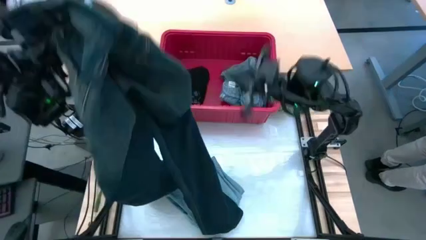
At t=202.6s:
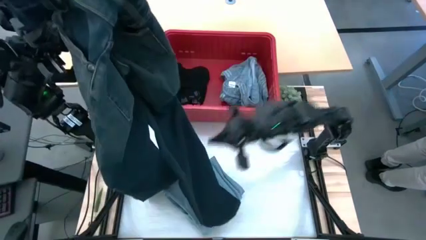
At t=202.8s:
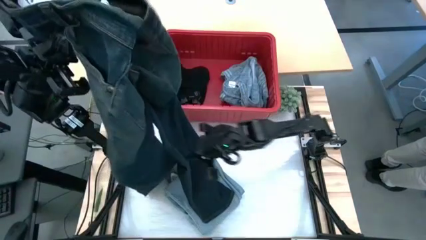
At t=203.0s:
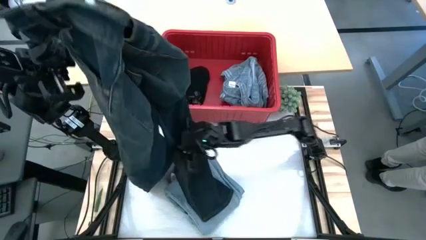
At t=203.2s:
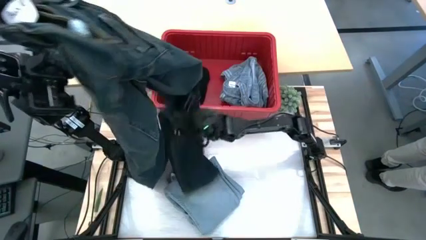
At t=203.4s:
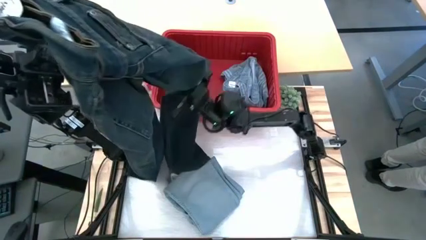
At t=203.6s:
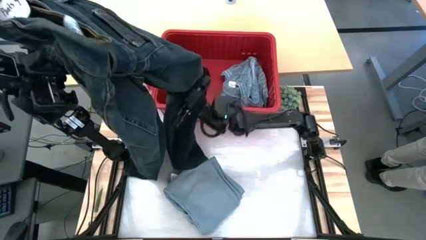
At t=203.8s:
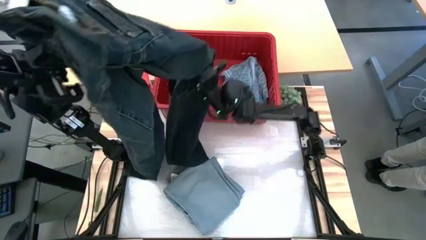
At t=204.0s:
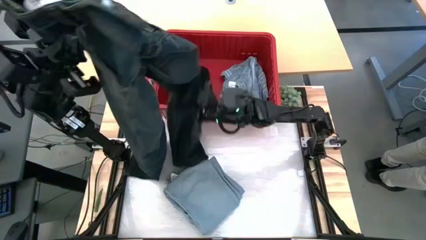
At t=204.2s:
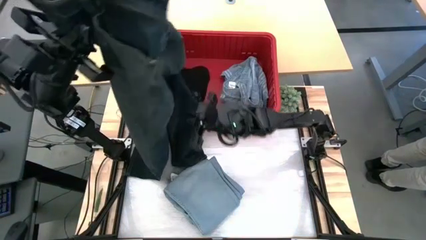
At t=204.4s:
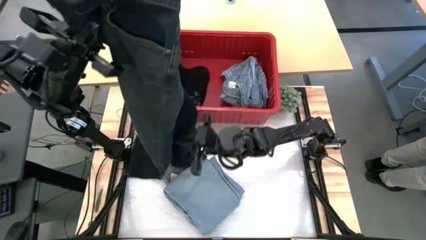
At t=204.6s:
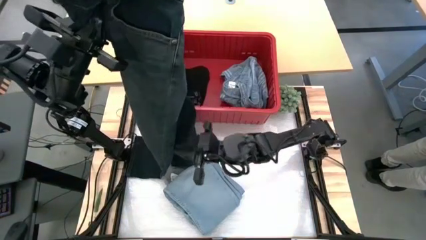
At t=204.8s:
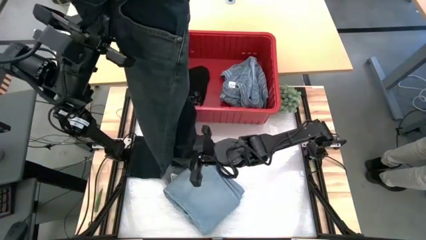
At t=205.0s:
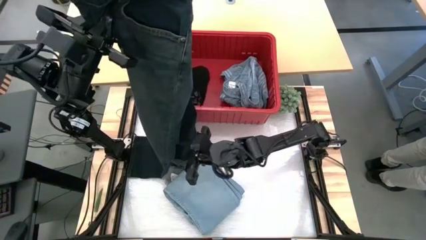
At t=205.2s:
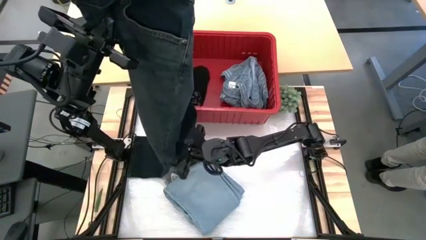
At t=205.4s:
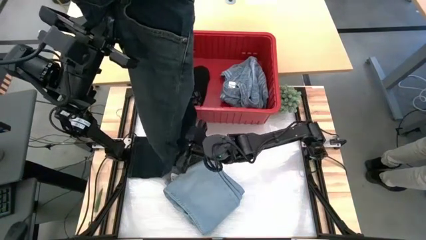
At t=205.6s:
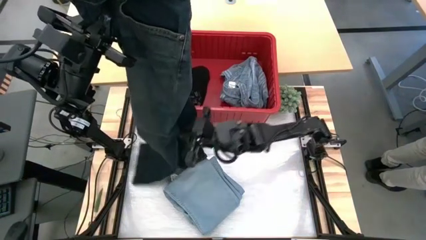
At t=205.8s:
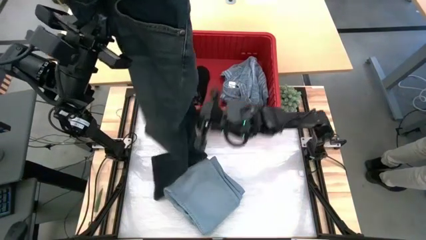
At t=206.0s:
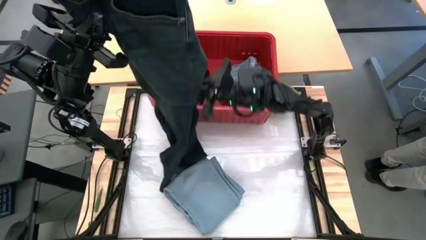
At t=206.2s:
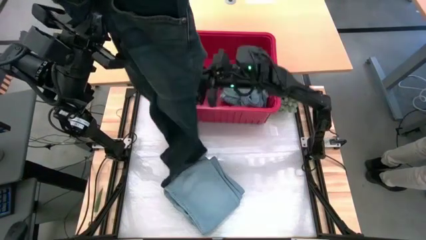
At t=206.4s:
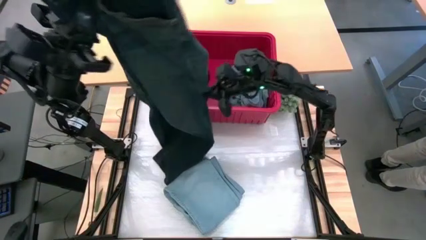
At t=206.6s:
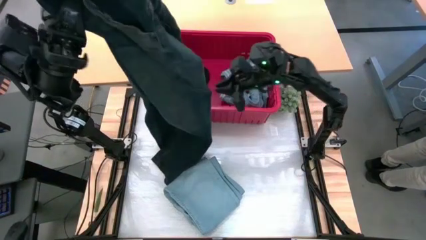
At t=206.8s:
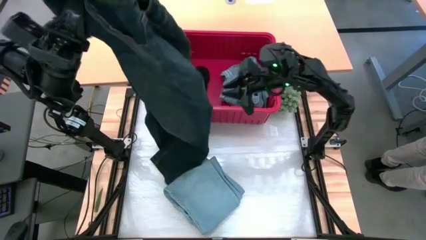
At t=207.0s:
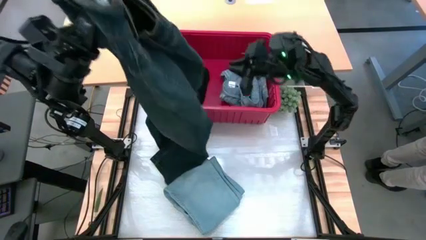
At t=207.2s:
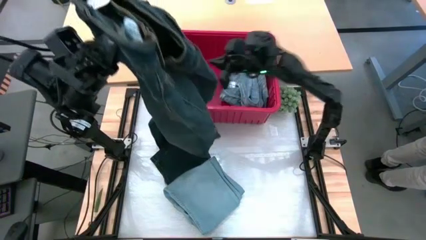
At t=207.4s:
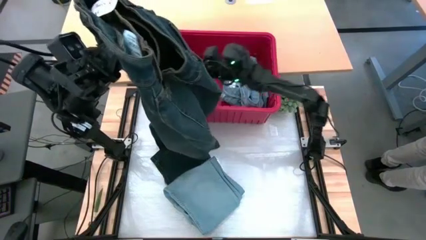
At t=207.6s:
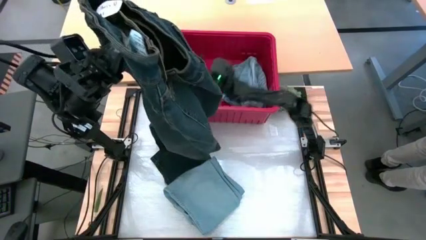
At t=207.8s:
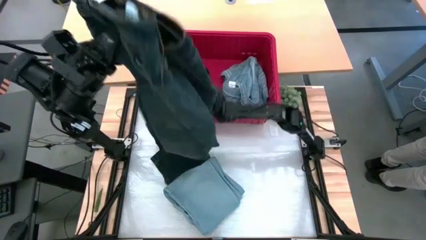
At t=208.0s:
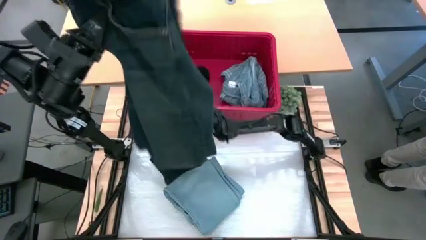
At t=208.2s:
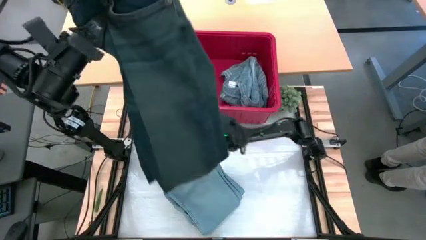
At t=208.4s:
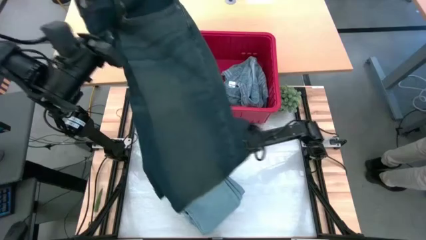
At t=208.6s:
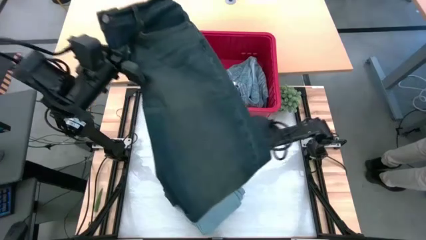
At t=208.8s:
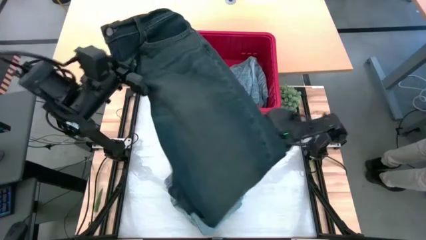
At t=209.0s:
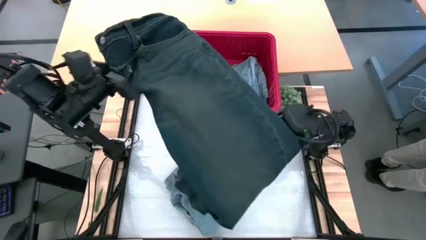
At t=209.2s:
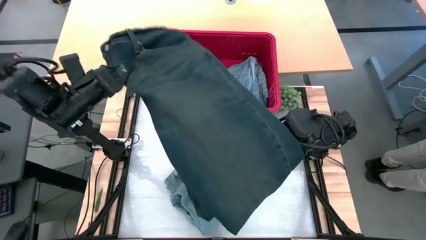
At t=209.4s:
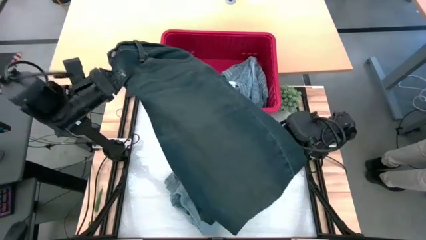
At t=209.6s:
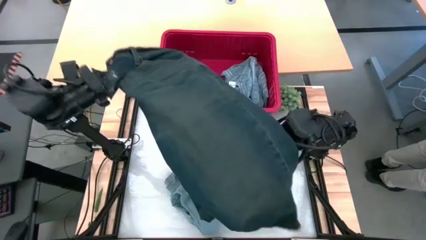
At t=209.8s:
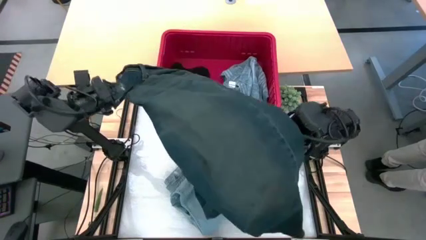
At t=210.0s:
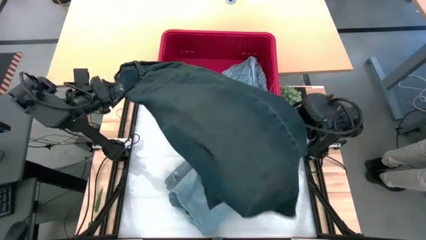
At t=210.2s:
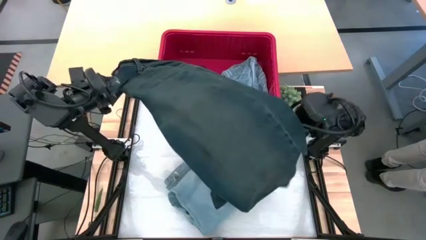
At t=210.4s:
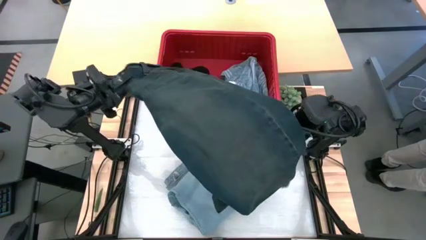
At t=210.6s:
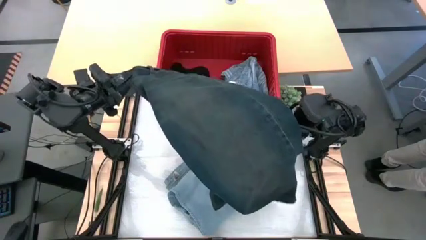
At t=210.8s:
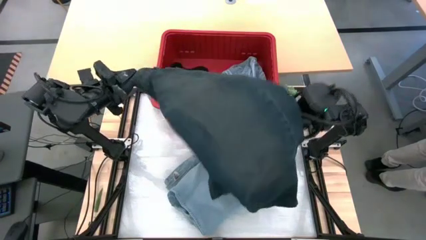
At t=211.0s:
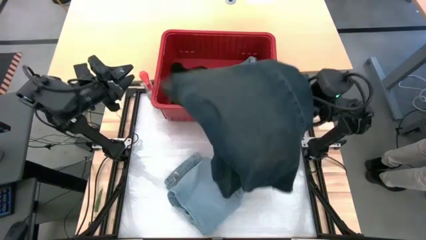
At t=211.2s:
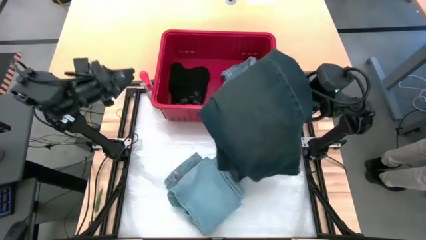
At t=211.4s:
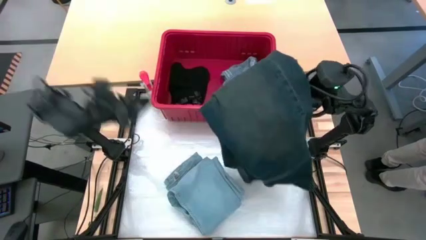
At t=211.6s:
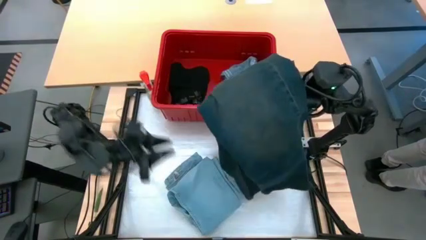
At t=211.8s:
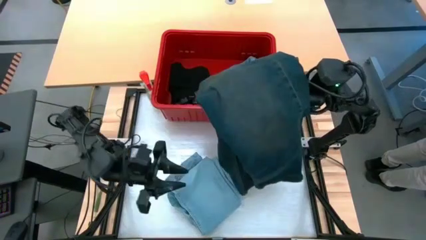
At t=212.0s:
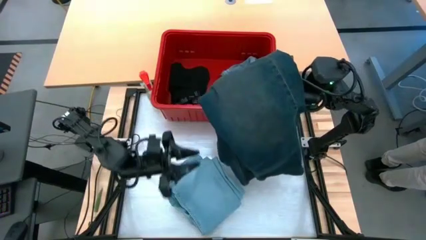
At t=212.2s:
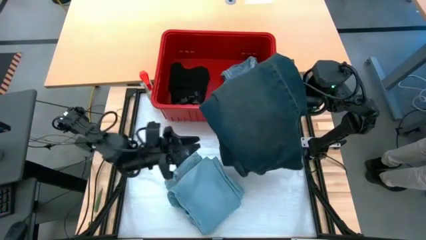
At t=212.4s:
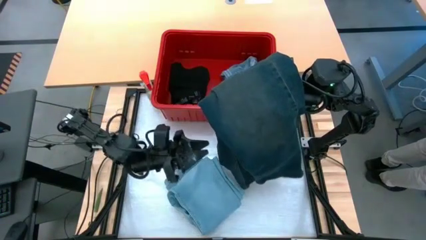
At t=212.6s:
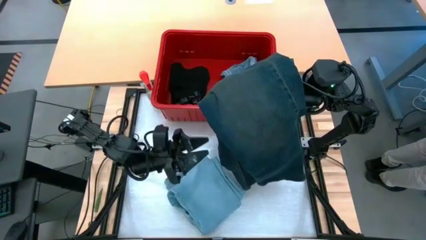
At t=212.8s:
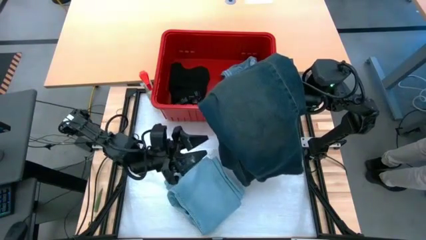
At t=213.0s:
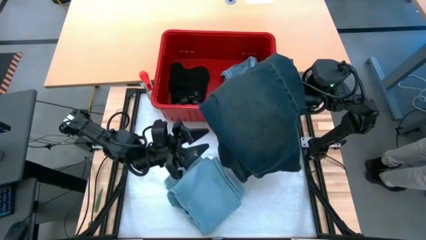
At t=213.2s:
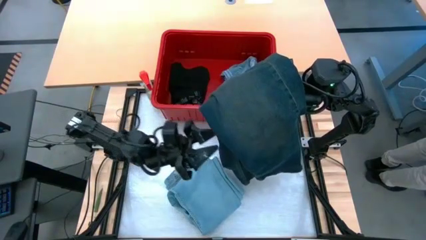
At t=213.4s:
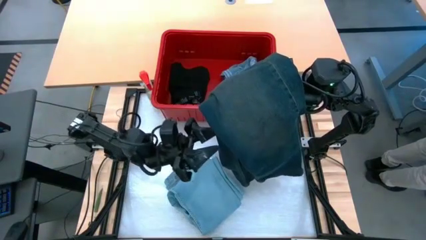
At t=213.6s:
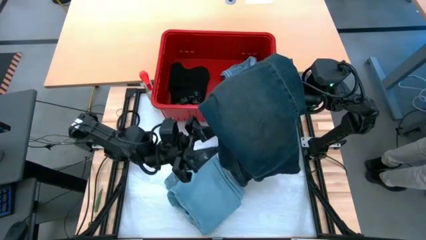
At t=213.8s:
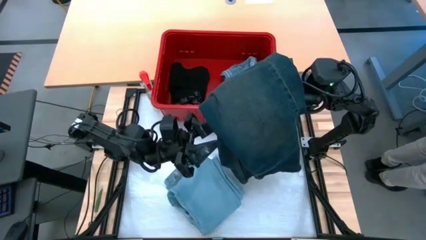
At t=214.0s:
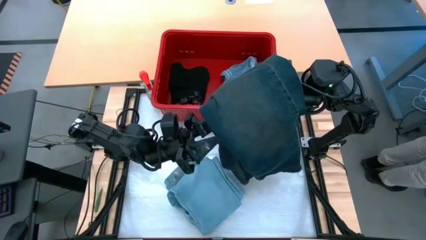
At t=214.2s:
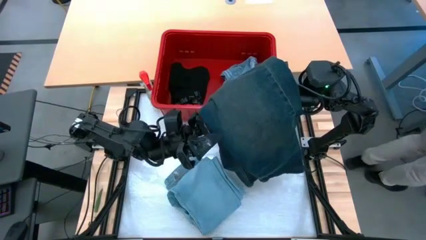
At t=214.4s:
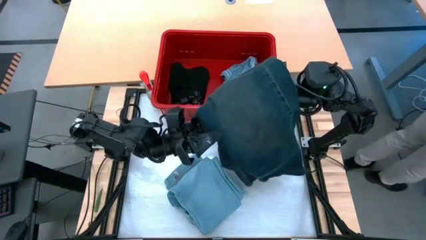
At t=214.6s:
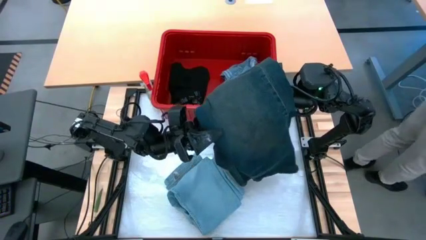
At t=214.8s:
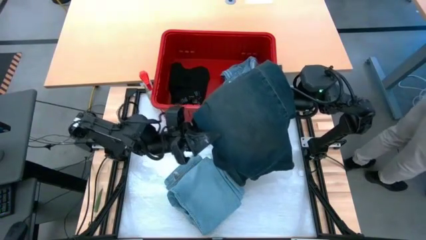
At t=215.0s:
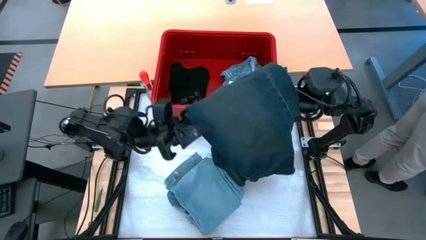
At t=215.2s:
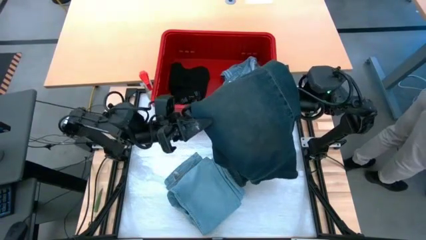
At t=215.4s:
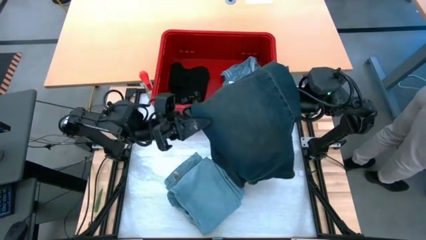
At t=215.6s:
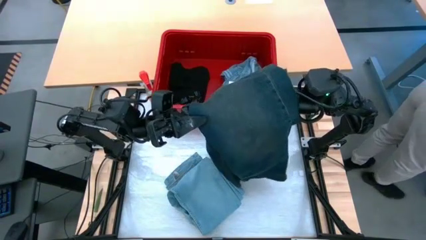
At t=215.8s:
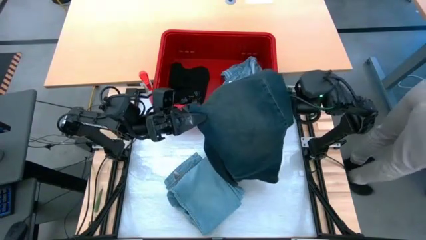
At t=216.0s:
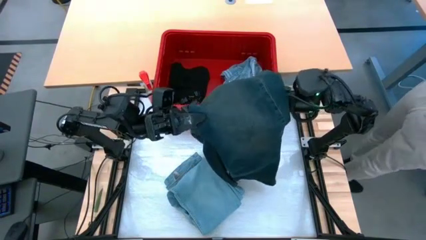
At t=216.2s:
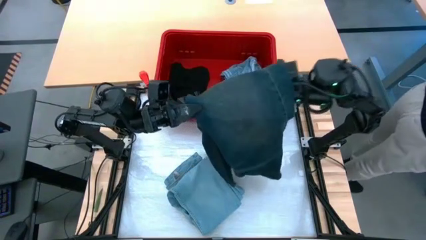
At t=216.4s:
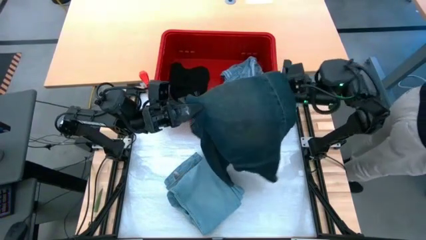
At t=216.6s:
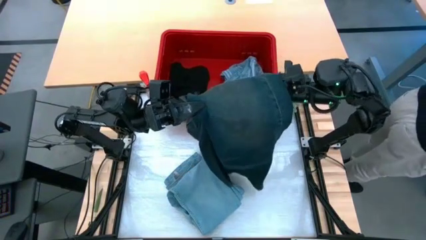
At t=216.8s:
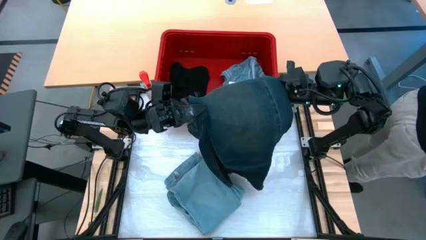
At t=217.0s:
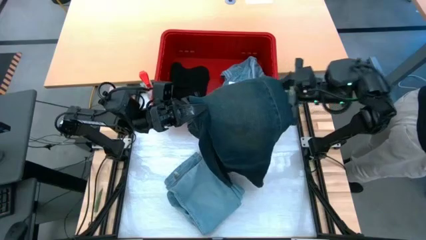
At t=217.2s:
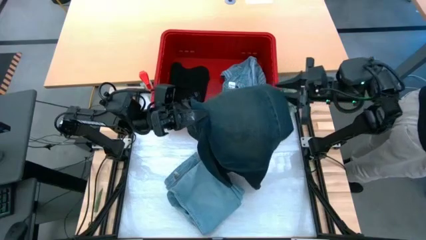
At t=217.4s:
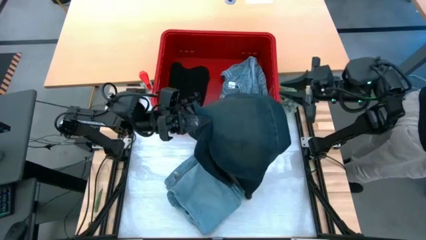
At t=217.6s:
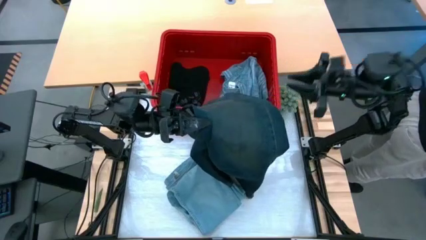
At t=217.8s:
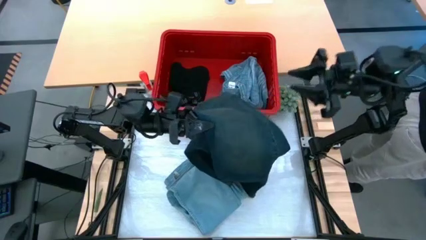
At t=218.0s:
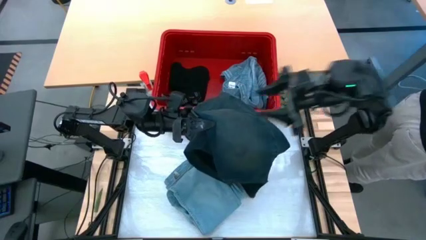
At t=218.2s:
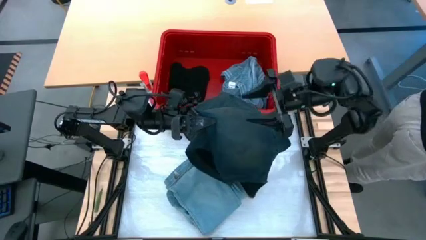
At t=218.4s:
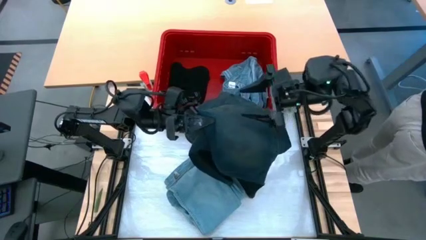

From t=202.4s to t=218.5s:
Task: Fold Laundry from Bin
Fold the dark blue pants

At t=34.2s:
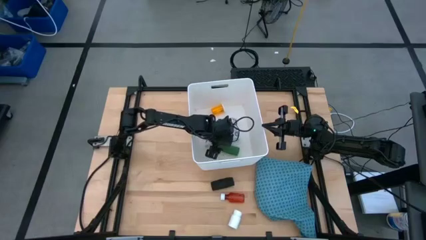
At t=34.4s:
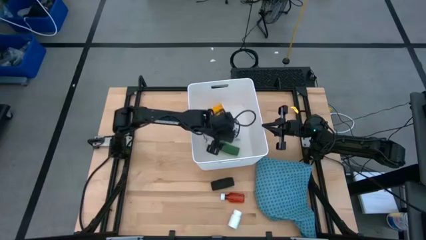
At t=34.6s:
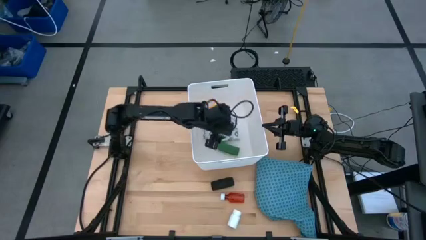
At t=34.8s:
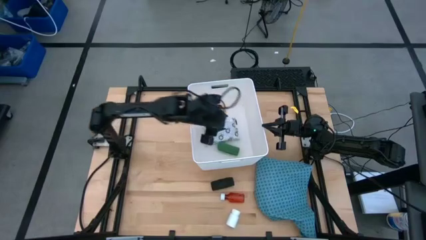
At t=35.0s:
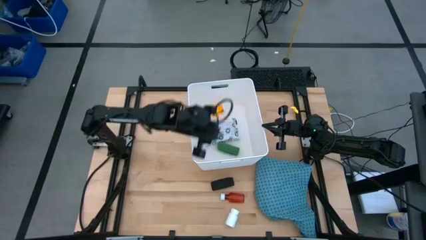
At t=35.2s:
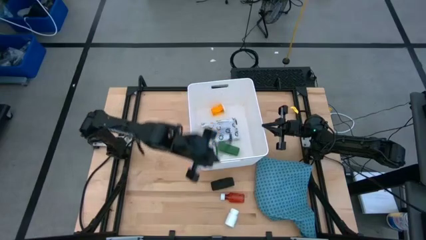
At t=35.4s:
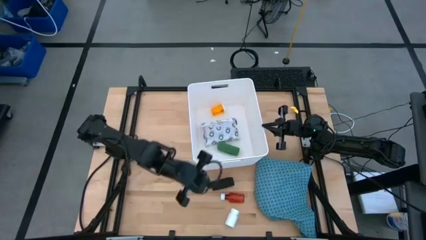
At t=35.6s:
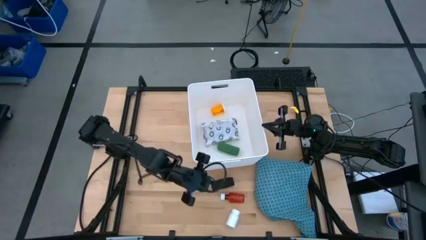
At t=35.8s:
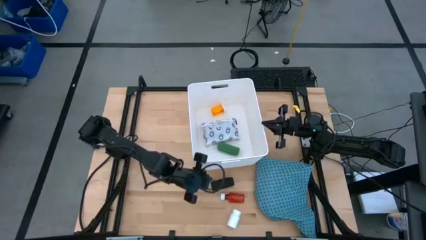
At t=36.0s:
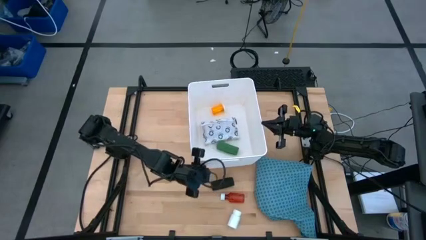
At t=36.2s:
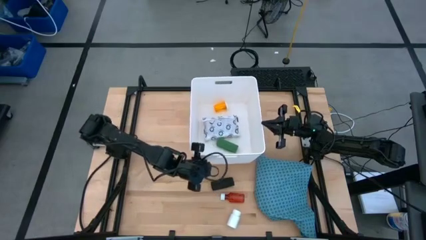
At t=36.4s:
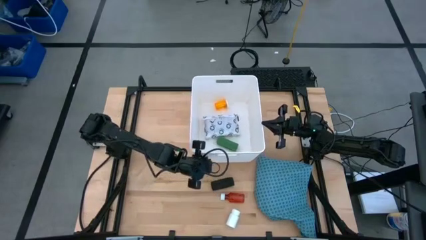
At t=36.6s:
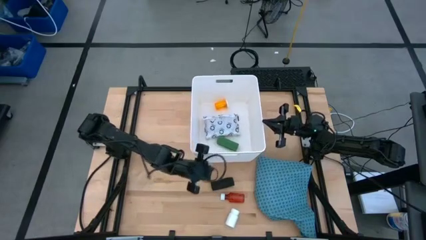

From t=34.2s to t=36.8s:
Task: Pick & place medical supplies in basket/bin
Adjust the white bin
